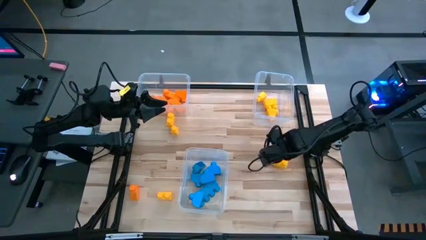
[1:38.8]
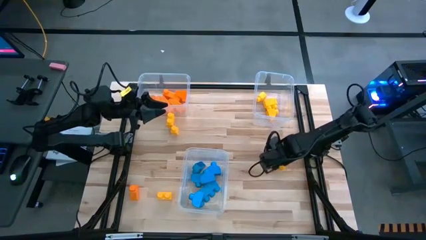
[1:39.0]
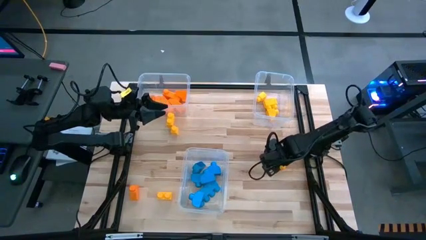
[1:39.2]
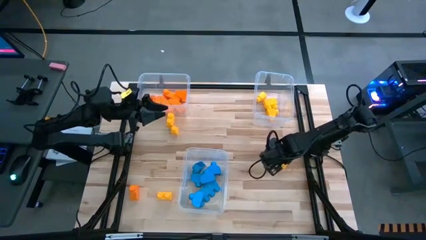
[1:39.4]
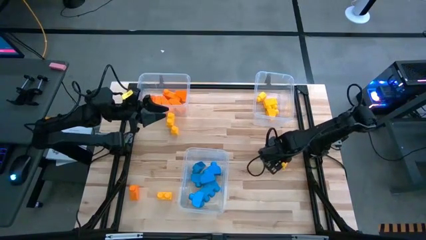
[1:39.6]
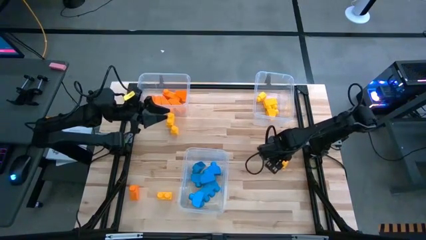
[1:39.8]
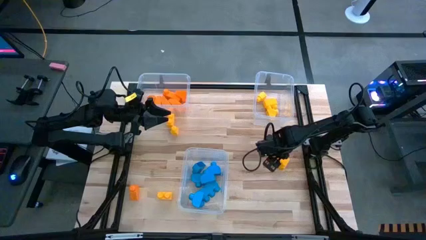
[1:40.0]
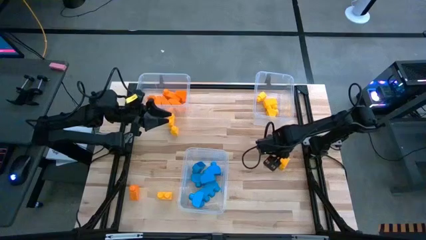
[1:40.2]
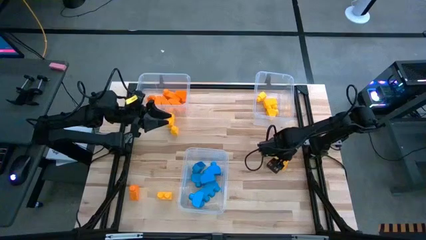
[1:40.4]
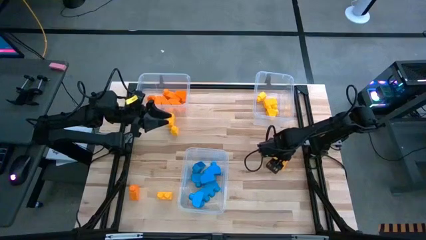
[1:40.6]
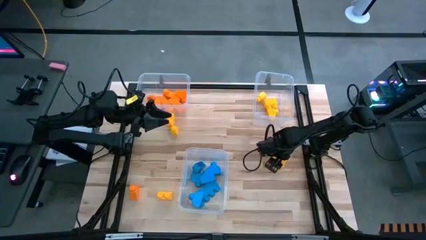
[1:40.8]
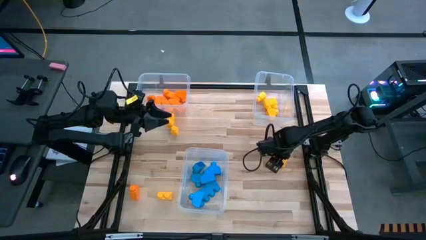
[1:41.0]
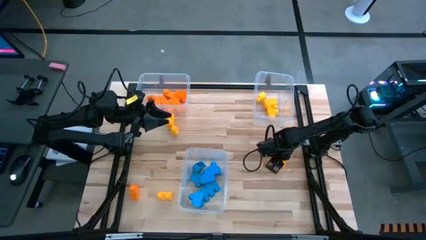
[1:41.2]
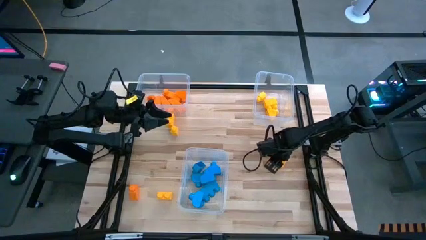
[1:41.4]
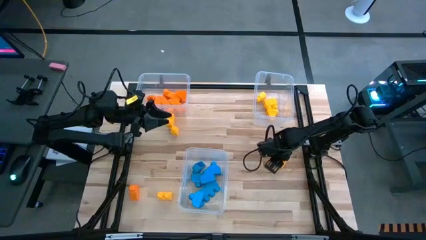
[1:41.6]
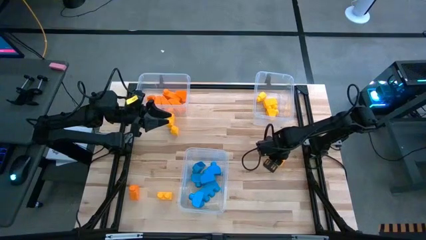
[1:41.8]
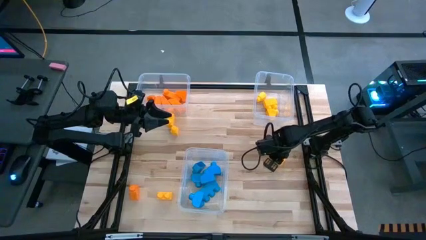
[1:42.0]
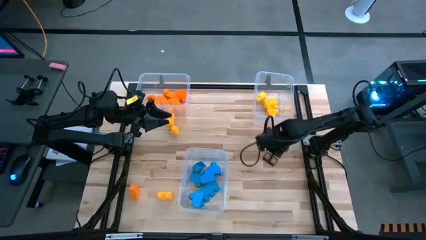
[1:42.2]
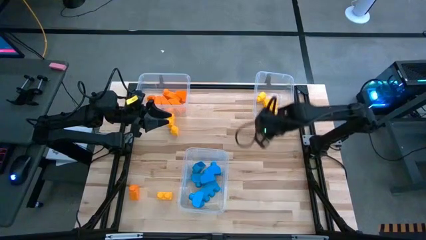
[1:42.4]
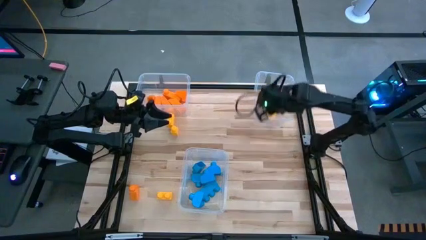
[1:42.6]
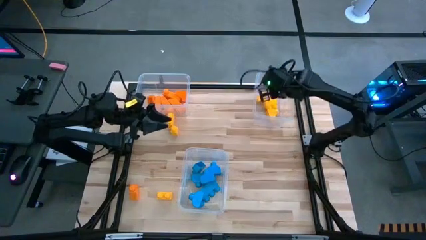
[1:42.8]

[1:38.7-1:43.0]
Task: Sort blocks
Put the yellow game piece into the top right transparent bin

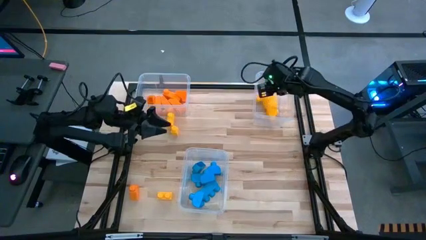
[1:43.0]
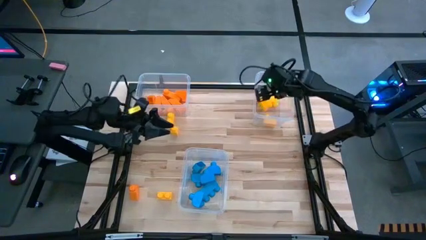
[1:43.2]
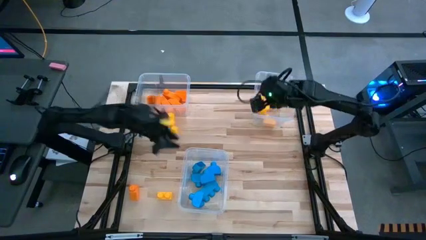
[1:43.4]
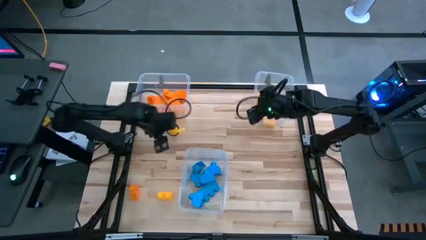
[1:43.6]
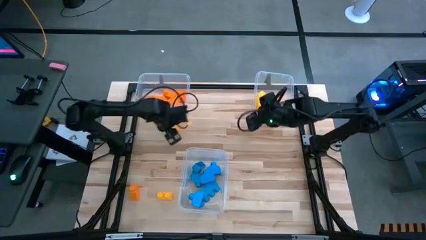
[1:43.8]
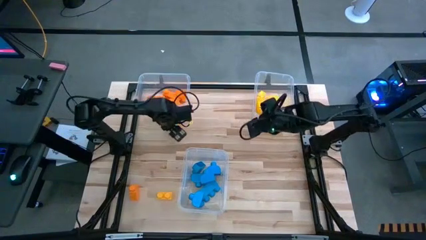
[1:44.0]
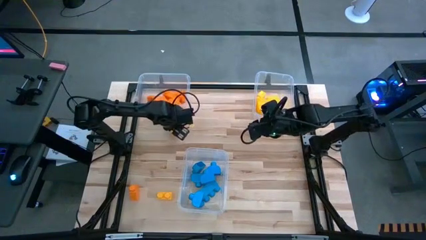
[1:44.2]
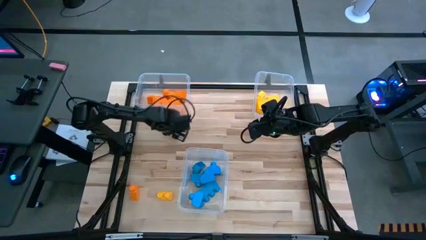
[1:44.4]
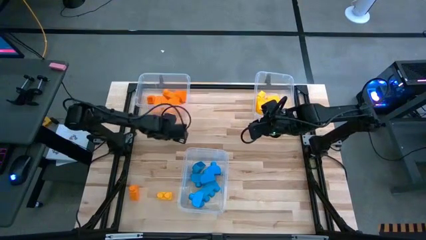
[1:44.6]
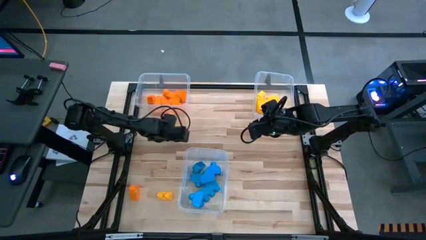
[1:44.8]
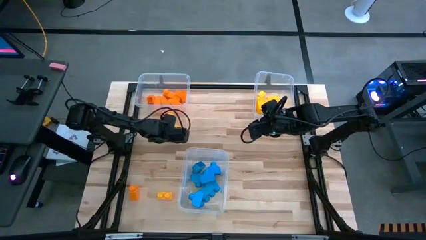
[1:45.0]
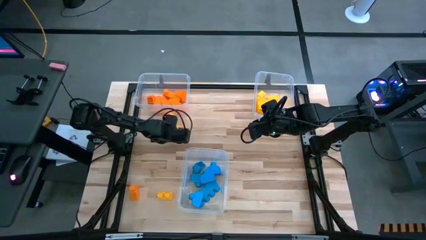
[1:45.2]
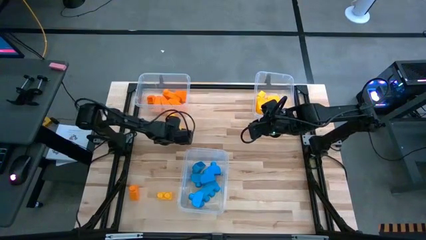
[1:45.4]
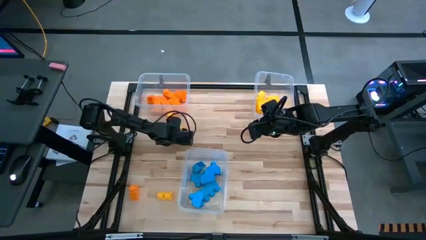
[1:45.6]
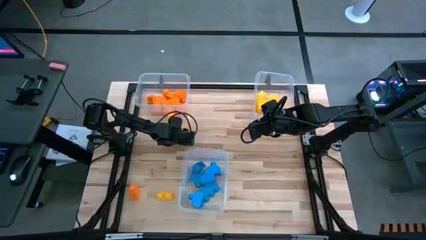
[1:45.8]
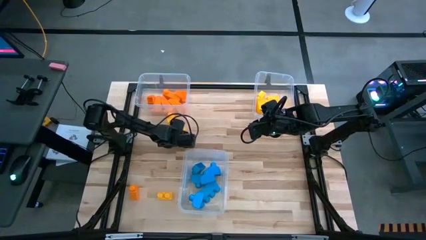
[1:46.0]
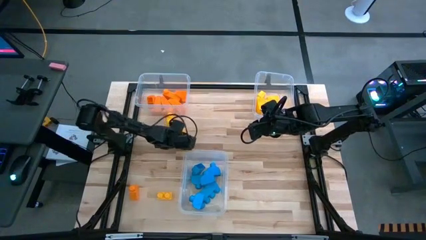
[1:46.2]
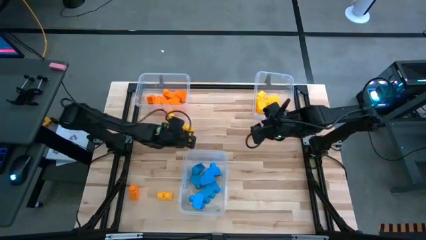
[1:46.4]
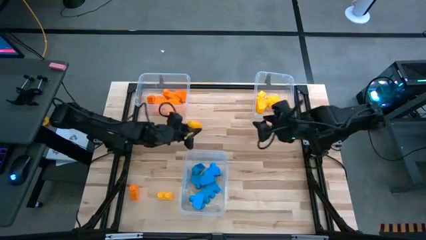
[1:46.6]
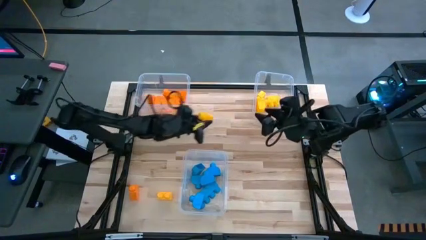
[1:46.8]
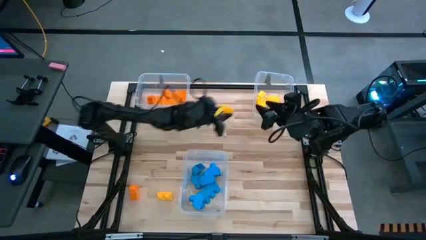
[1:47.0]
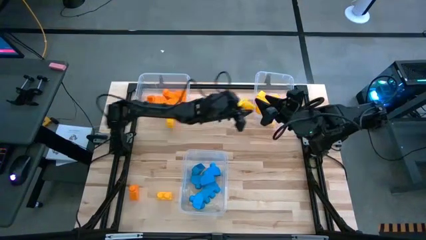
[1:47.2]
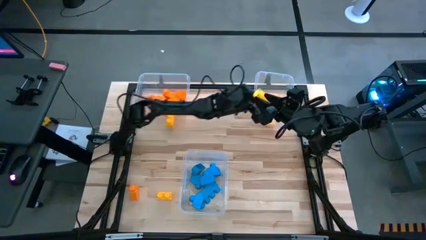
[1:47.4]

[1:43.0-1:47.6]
Put the yellow game piece into the top right transparent bin

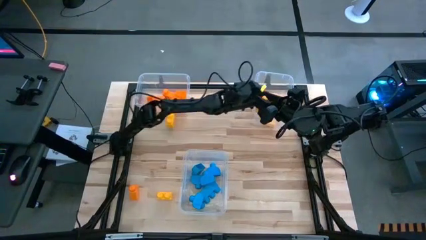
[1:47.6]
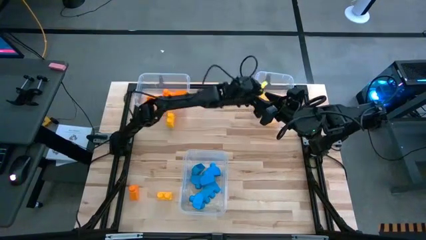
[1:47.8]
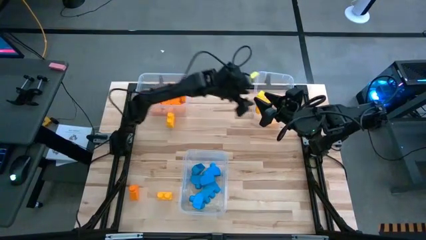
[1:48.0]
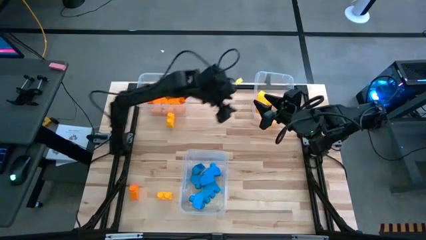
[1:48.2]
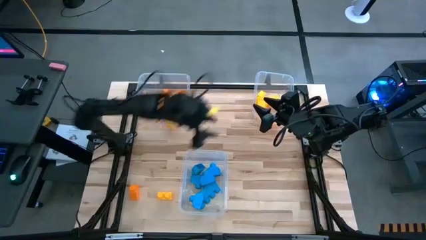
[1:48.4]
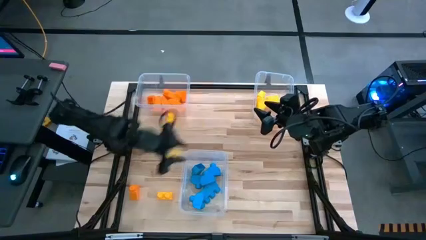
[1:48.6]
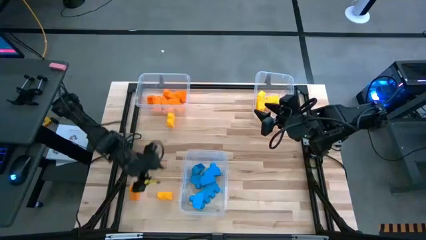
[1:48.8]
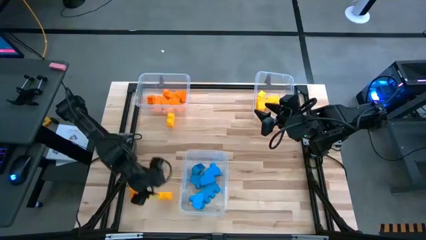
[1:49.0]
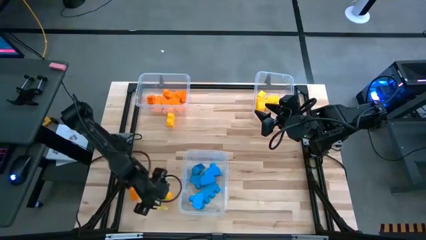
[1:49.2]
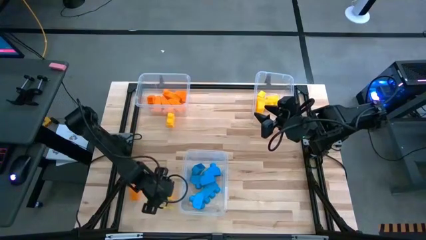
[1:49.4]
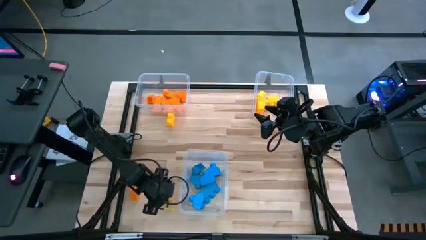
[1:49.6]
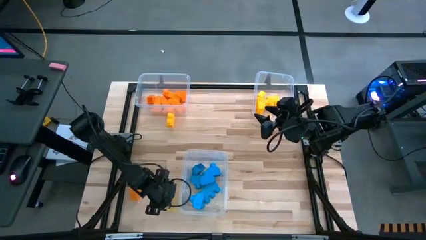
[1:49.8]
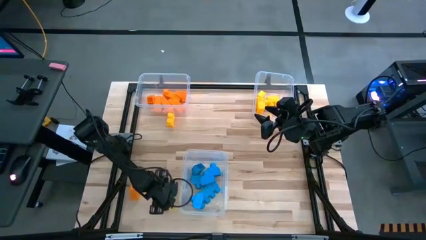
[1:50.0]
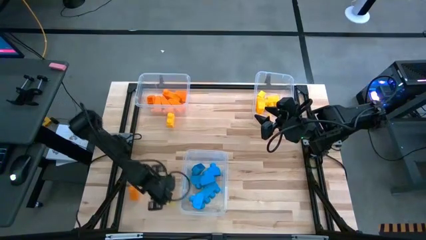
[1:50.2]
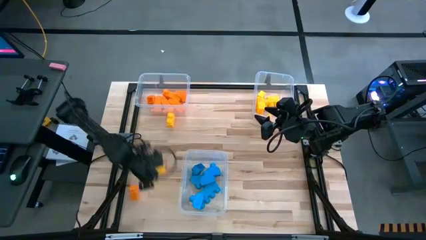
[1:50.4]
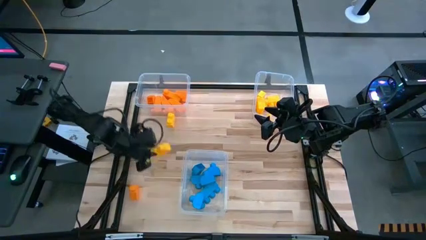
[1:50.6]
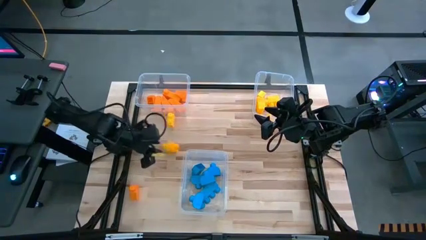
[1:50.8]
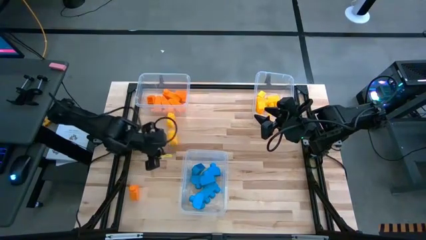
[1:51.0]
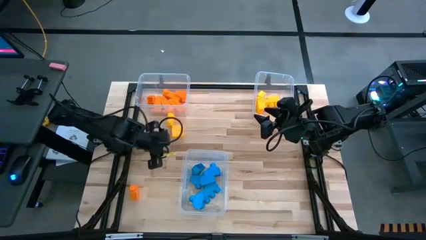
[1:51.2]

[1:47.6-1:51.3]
Put the yellow game piece into the top right transparent bin

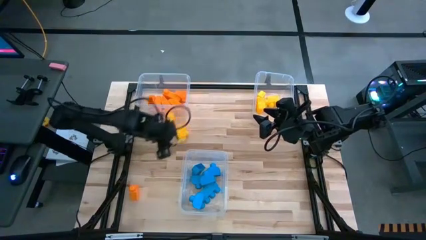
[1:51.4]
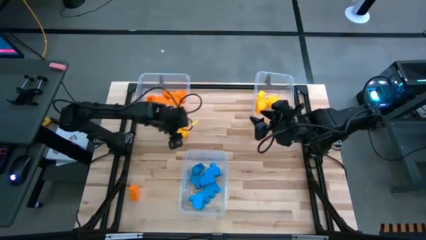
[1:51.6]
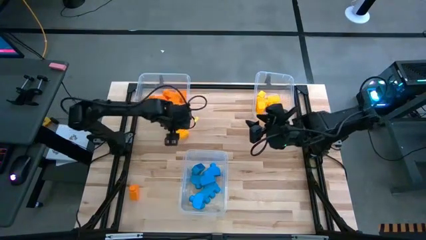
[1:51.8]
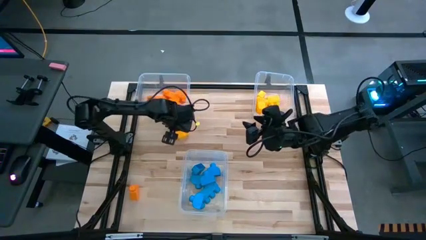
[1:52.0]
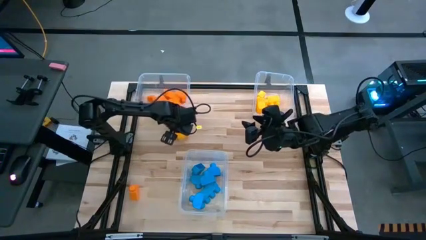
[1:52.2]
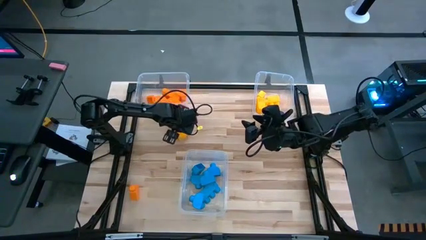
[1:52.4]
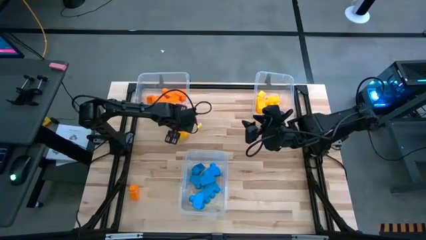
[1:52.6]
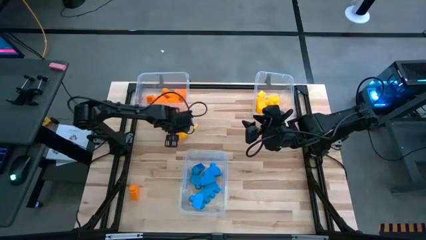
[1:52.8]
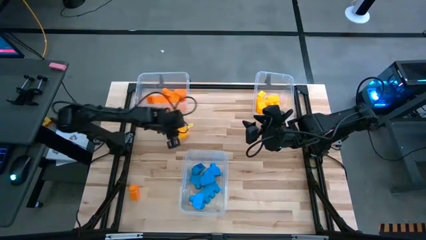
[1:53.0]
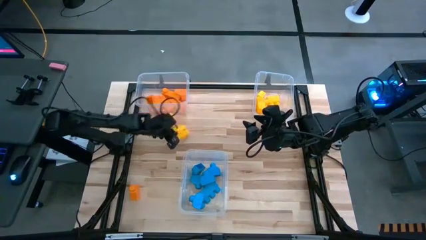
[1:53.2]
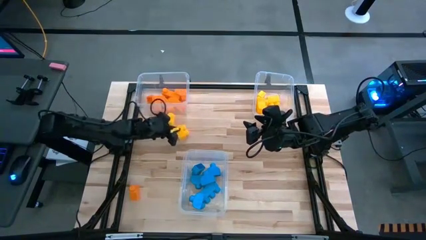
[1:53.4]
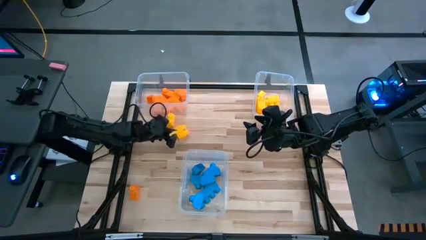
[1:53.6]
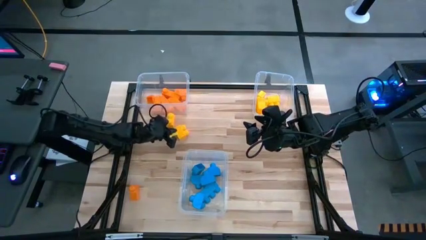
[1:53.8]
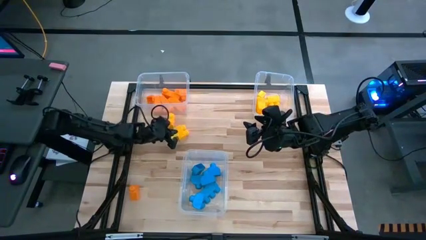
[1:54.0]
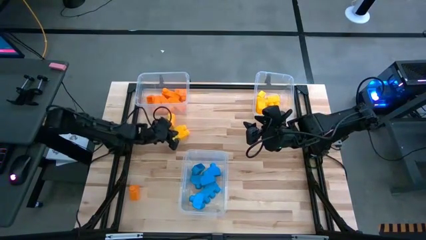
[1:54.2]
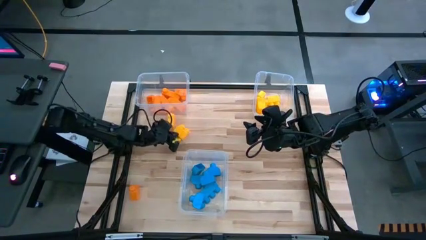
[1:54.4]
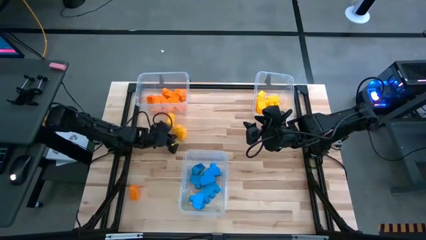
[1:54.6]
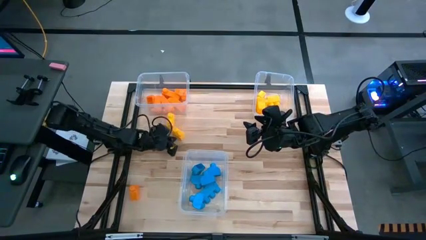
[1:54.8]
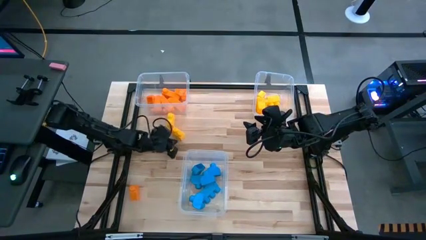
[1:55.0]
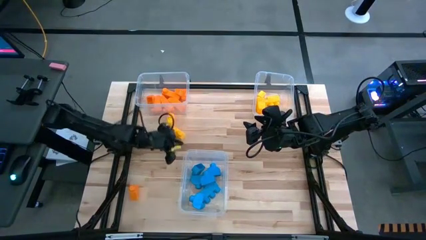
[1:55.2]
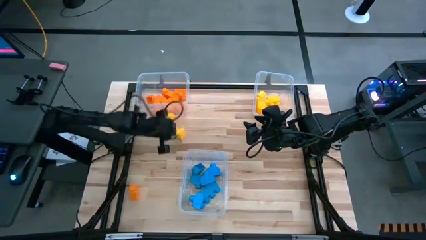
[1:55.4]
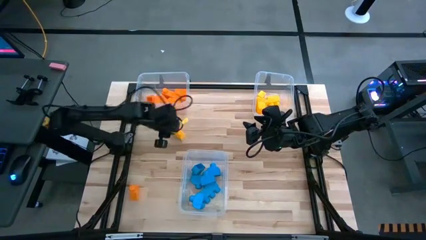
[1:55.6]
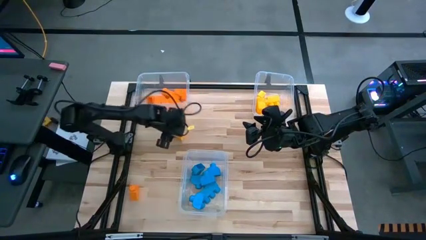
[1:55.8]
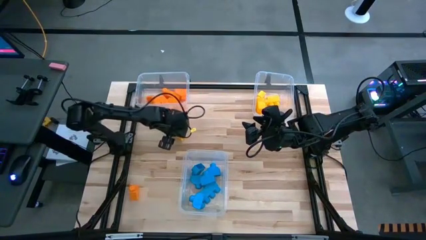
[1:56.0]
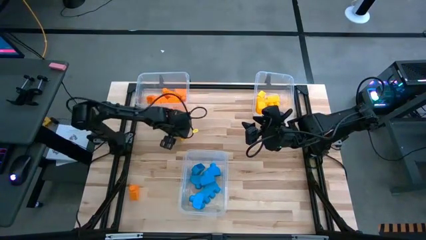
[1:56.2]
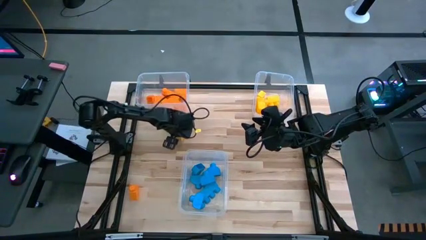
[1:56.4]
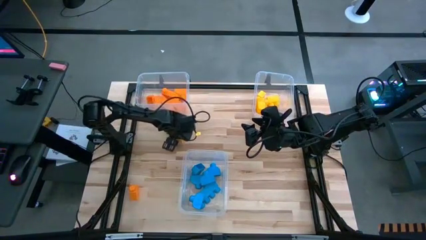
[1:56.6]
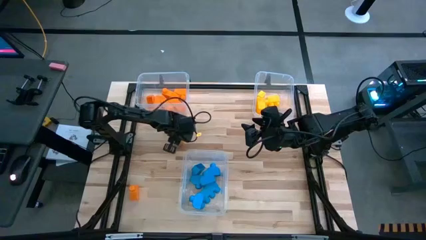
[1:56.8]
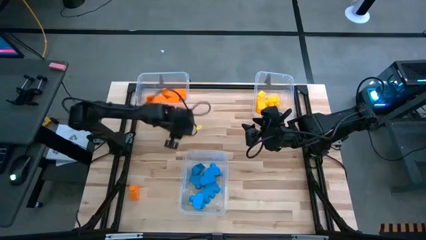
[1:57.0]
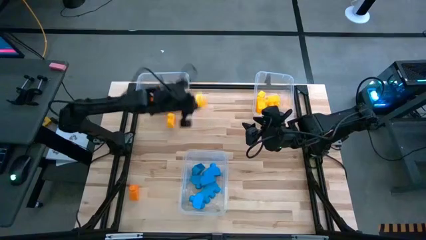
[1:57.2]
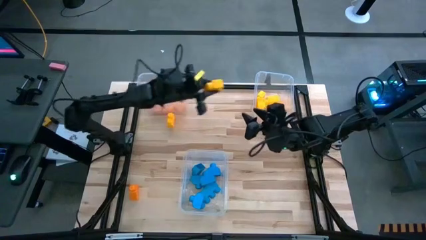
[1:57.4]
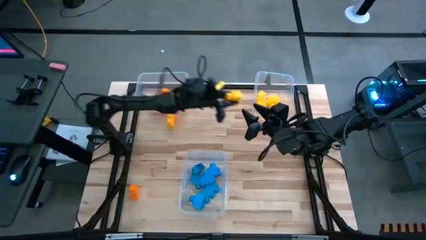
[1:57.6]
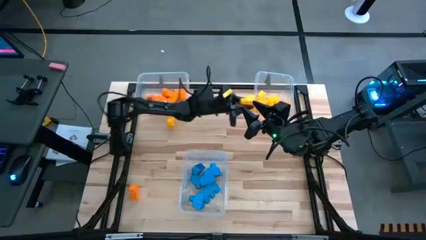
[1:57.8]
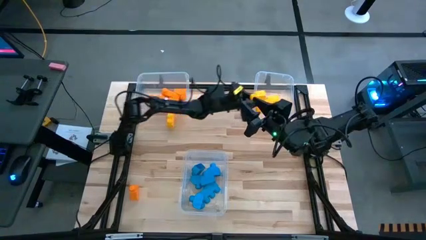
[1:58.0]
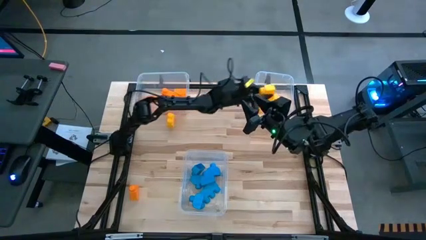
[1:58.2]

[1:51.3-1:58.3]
Put the yellow game piece into the top right transparent bin
